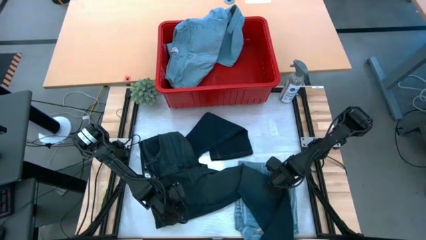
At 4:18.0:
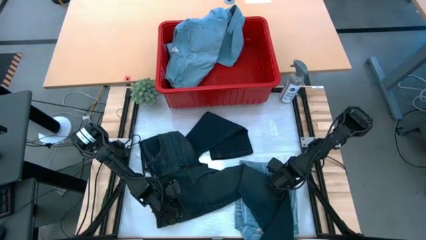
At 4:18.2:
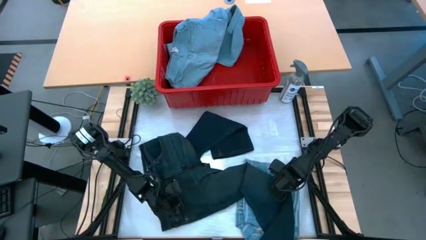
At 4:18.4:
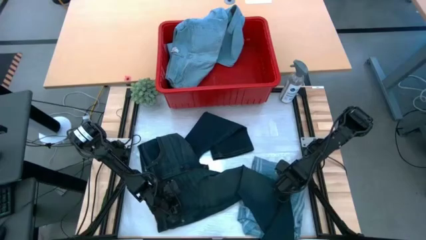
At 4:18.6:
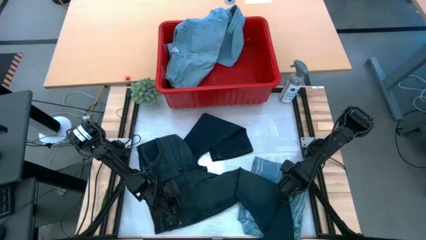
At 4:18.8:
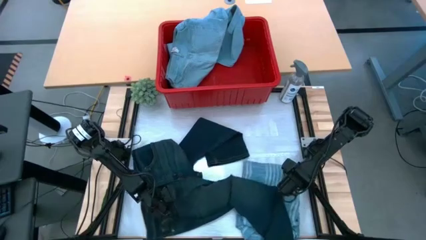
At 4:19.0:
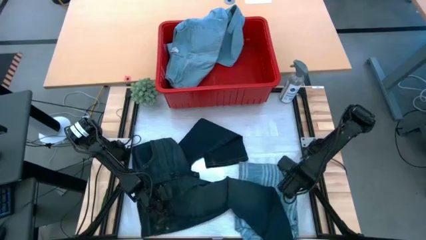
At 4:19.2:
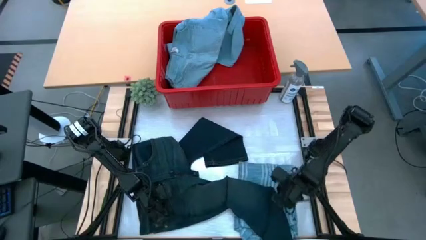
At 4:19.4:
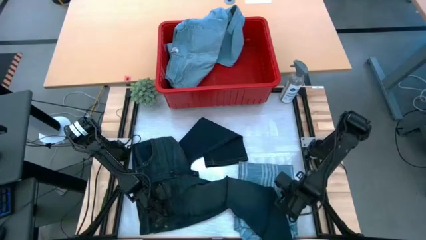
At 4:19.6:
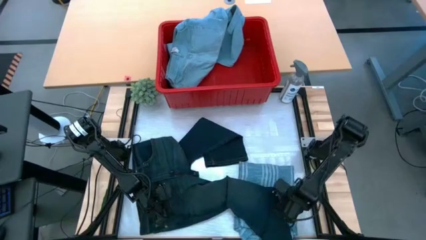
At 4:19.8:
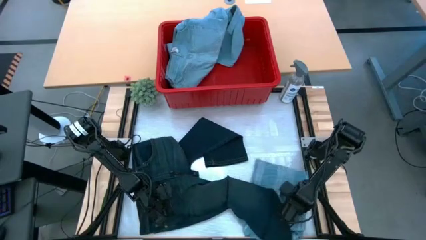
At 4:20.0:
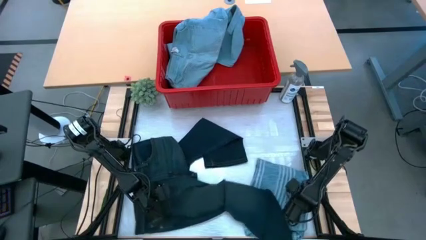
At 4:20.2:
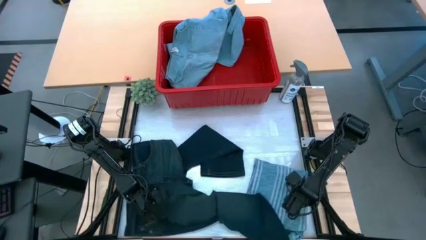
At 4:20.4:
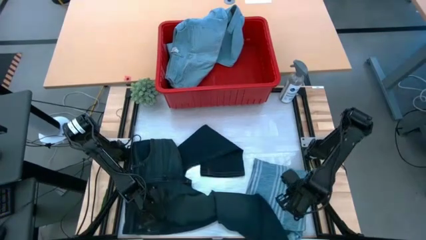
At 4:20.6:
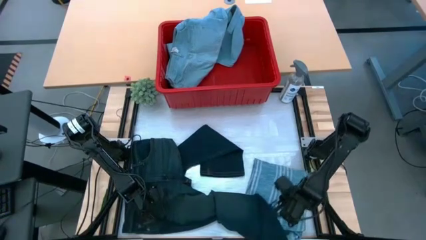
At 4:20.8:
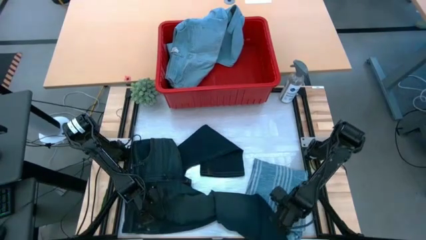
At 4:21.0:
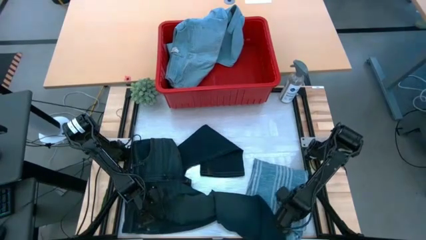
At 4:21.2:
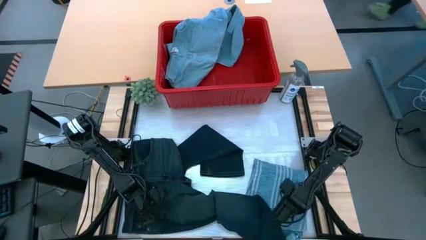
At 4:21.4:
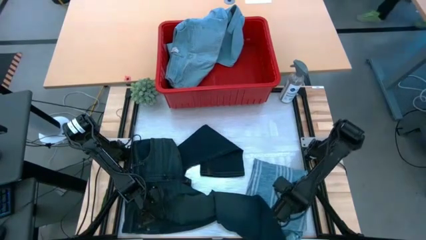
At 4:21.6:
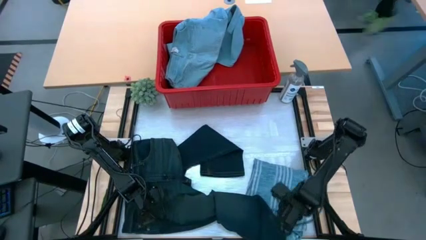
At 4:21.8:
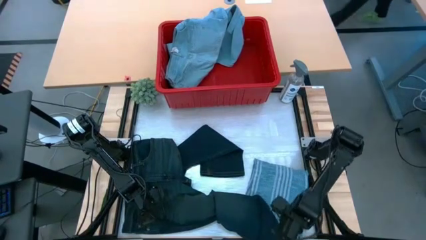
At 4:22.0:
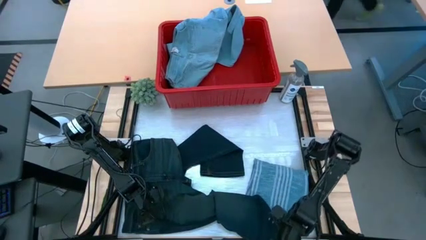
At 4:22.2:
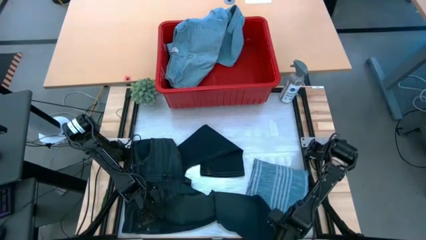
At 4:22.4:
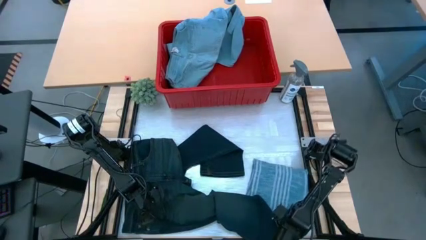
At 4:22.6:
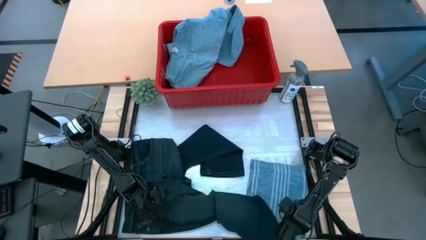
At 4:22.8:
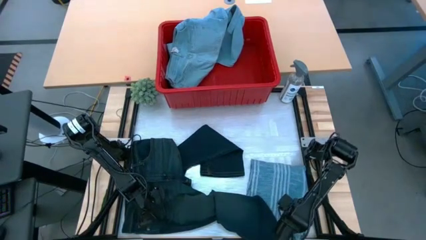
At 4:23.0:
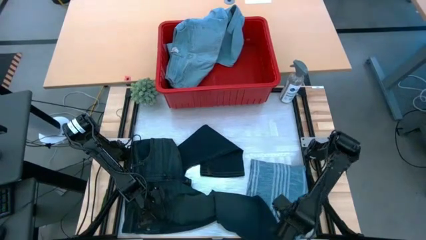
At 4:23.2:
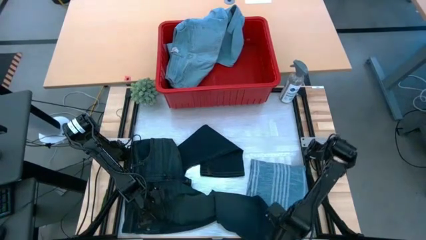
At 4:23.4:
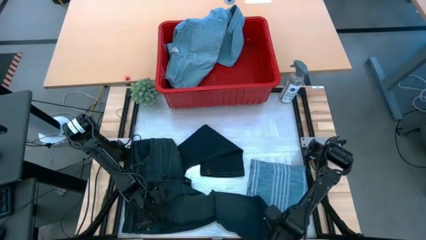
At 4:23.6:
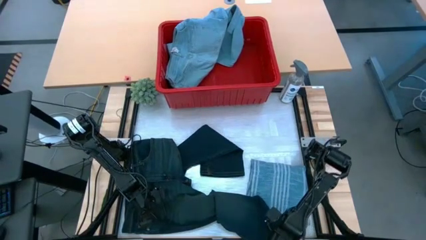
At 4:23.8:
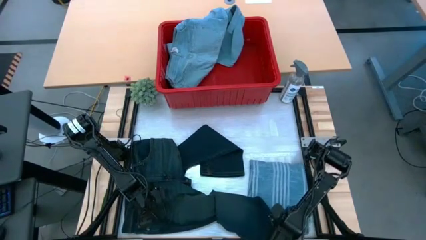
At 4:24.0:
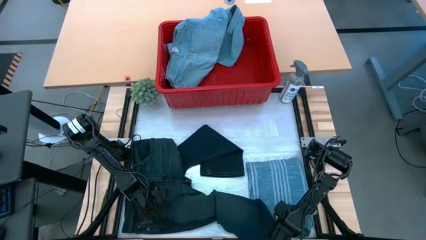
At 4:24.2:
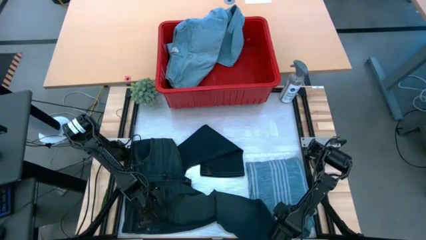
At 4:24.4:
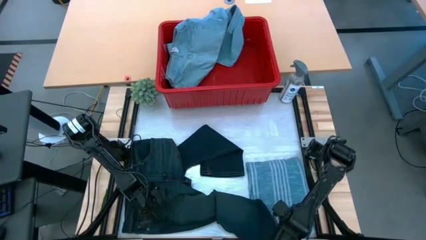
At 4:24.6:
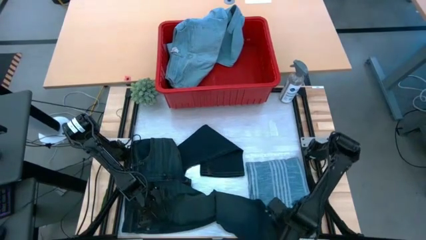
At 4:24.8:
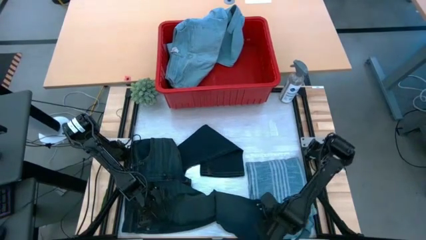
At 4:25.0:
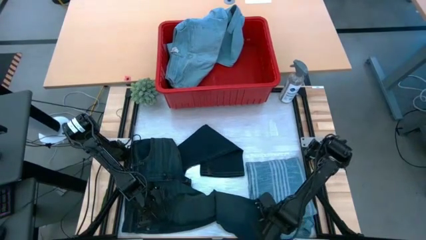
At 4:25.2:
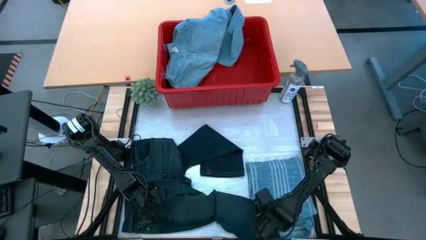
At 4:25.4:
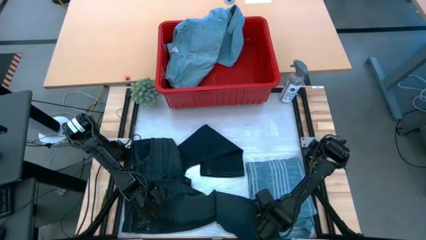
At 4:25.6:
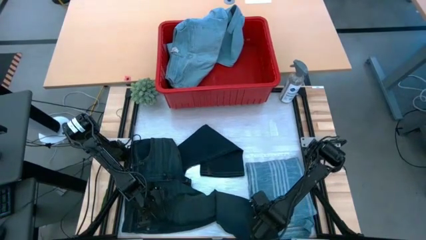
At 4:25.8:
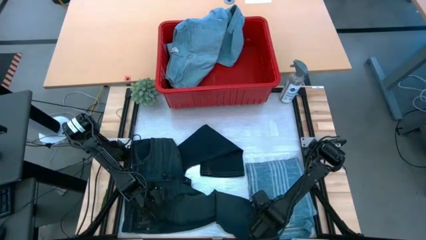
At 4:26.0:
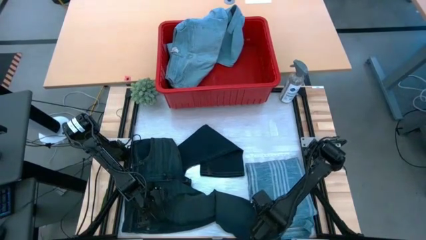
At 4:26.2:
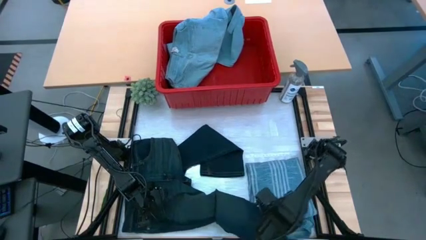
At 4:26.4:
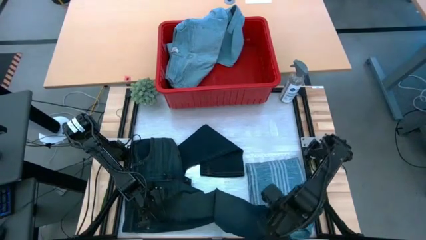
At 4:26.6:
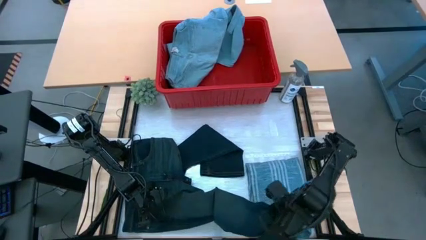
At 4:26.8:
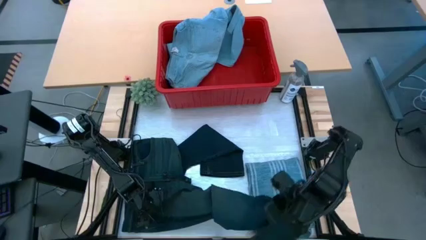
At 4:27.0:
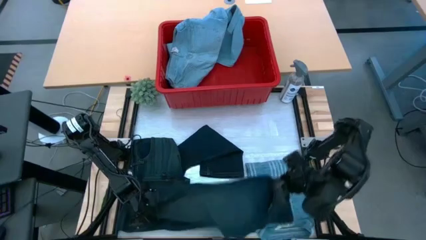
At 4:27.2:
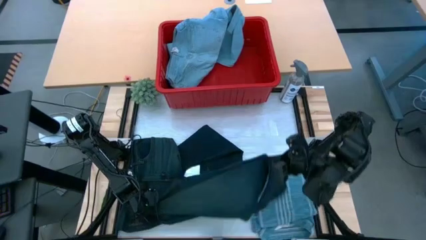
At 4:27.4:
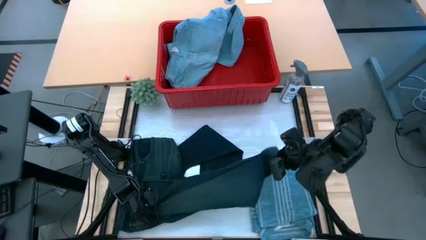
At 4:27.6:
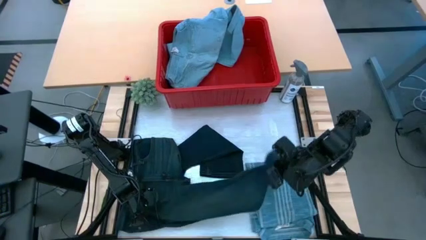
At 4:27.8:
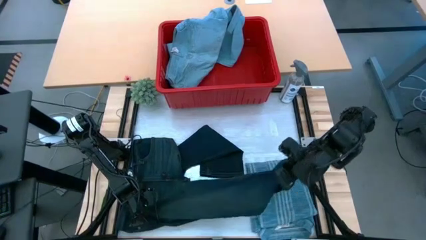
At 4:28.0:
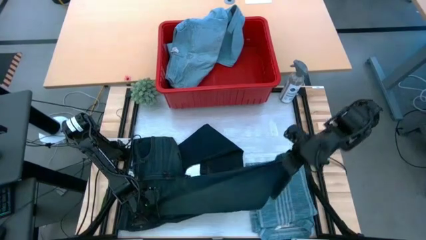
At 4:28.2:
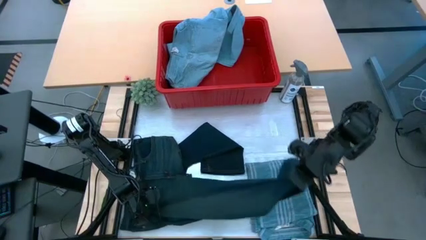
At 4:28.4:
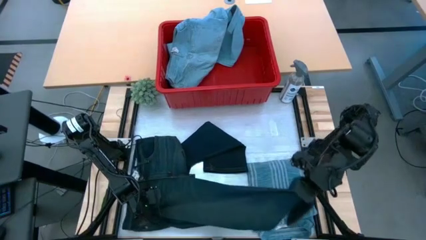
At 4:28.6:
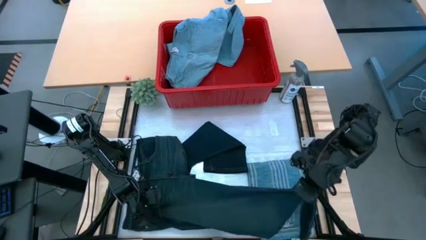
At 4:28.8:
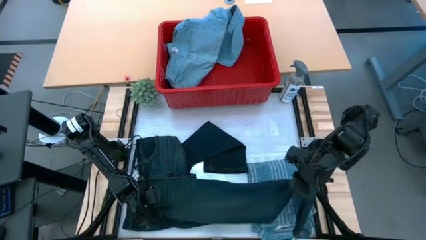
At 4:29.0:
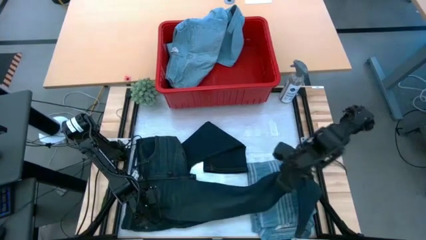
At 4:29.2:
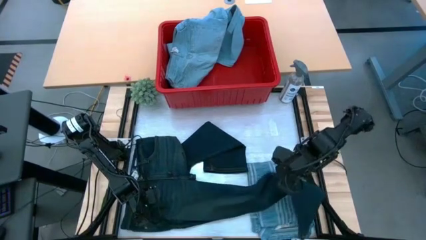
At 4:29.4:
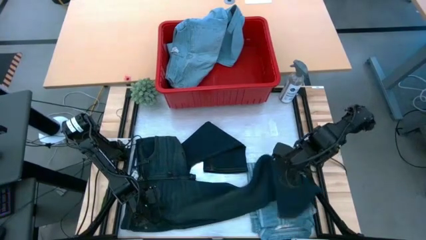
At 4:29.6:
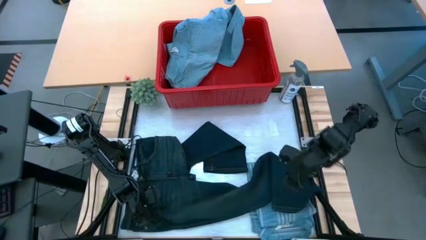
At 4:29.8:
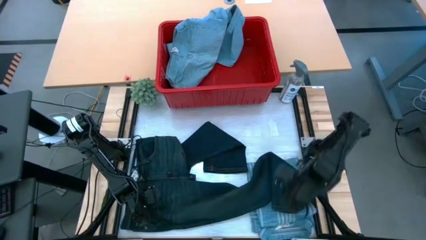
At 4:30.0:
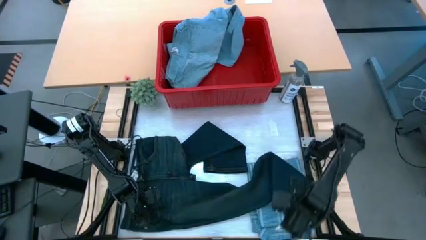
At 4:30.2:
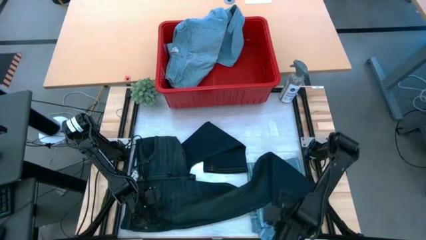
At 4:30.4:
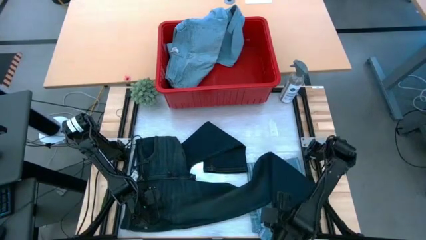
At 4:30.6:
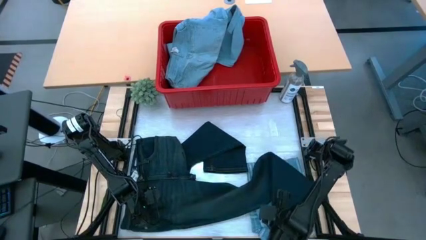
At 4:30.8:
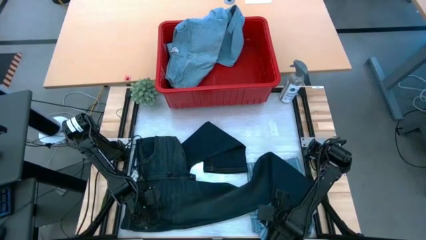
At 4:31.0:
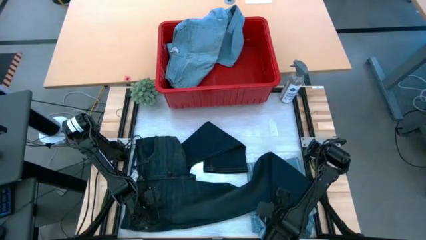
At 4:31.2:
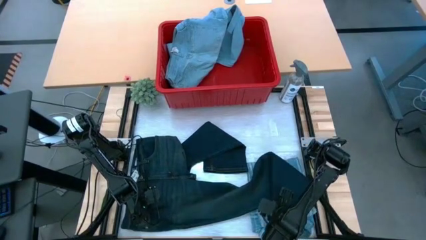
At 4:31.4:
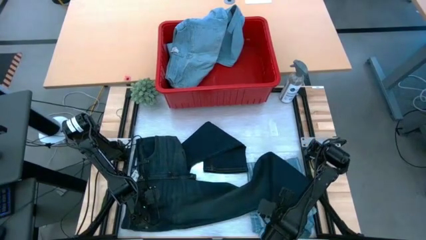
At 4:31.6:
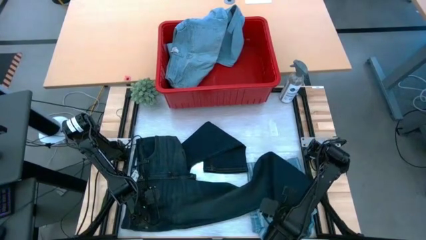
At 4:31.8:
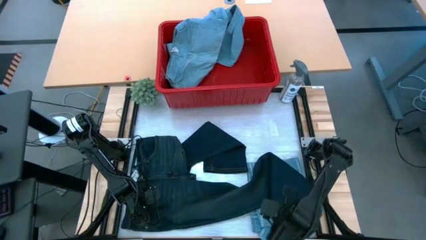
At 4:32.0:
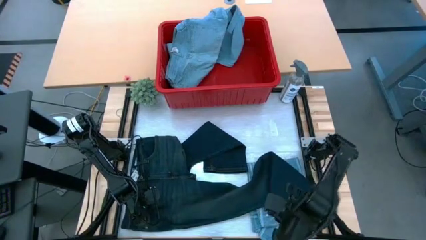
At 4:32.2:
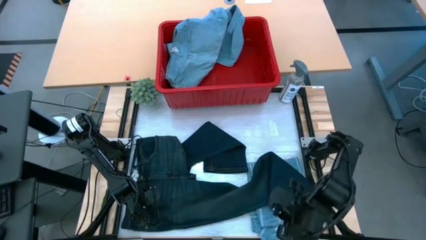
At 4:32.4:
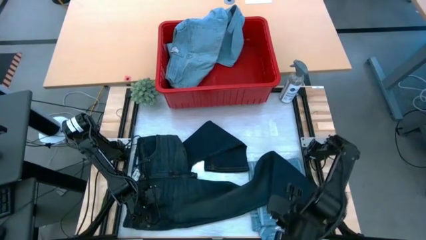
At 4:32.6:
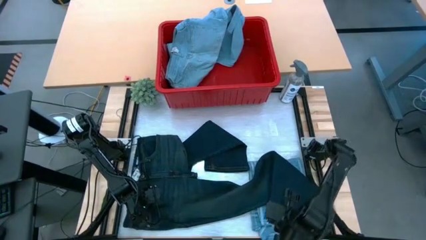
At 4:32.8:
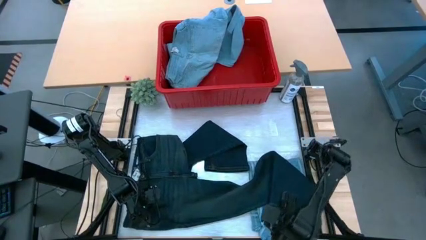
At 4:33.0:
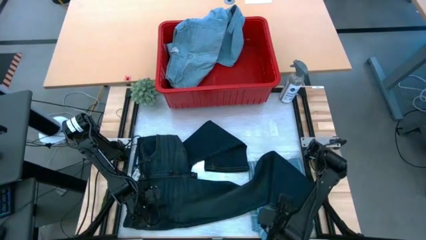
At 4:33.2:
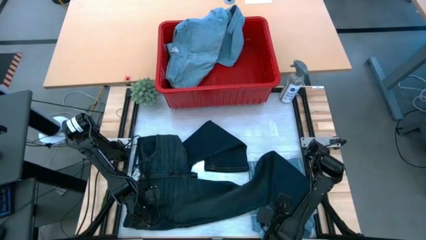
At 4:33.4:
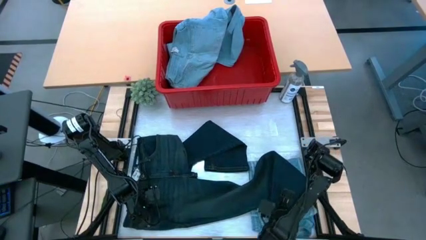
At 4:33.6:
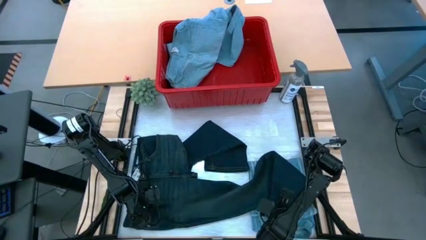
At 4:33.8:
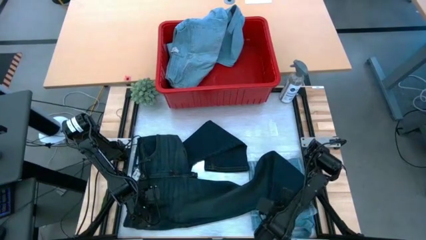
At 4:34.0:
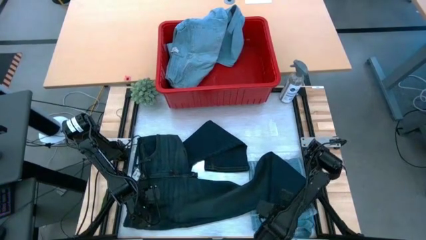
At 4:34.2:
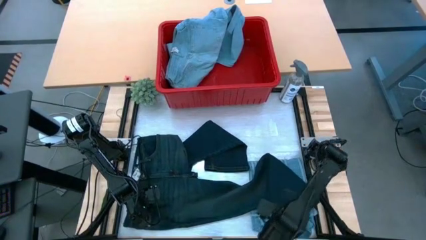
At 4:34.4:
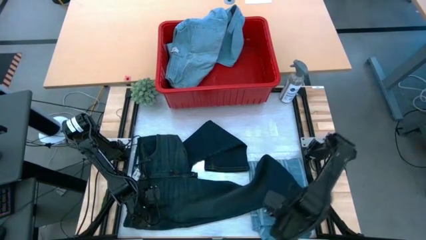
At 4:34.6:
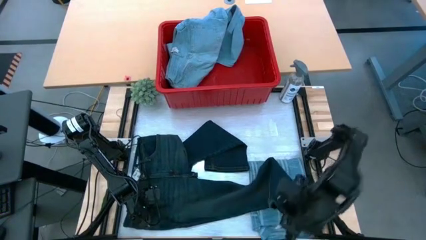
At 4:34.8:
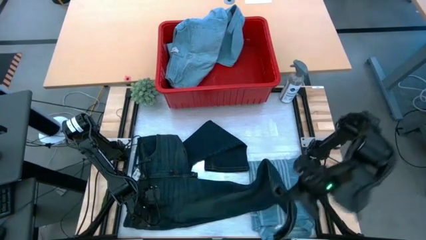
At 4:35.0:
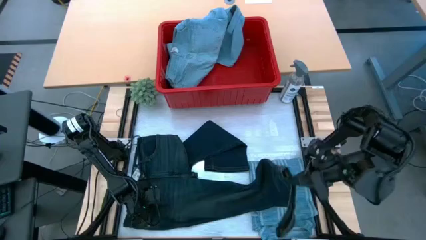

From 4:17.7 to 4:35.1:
Task: Fold Laundry from Bin
Fold the blue denim pants
